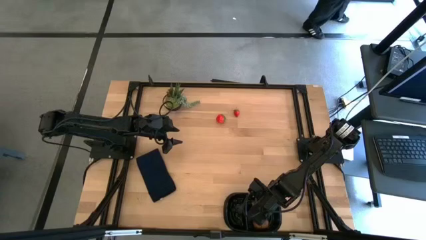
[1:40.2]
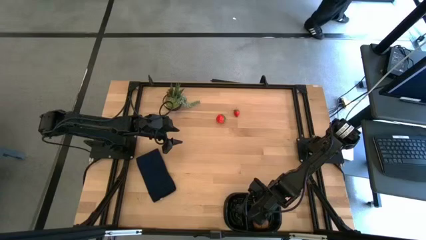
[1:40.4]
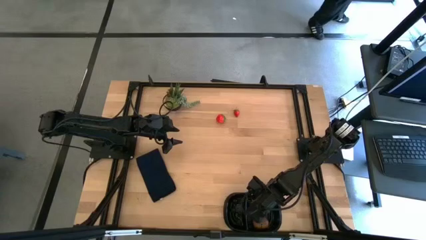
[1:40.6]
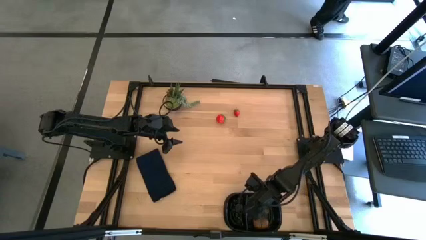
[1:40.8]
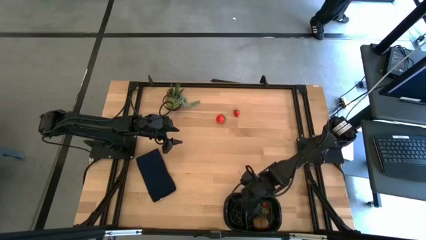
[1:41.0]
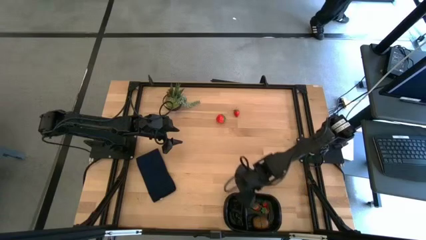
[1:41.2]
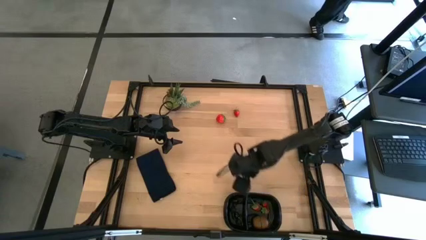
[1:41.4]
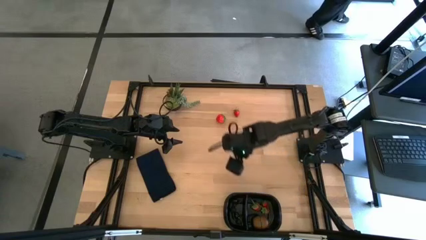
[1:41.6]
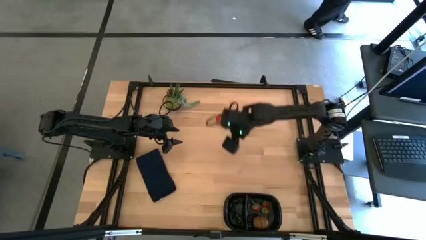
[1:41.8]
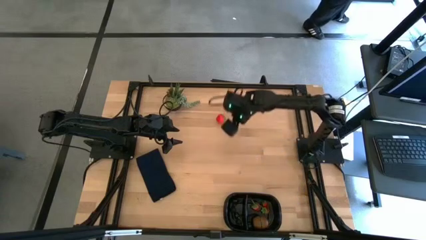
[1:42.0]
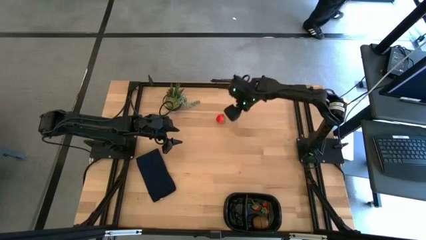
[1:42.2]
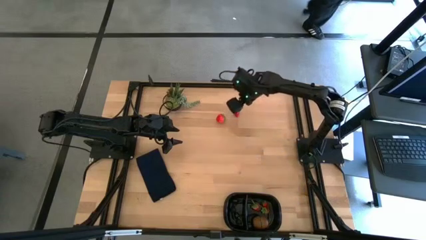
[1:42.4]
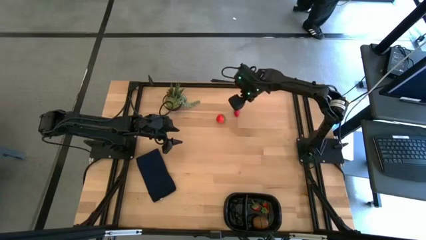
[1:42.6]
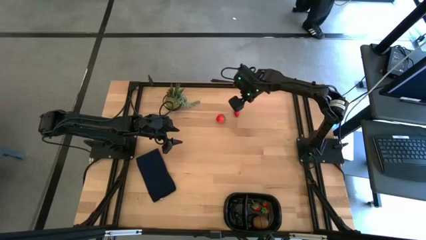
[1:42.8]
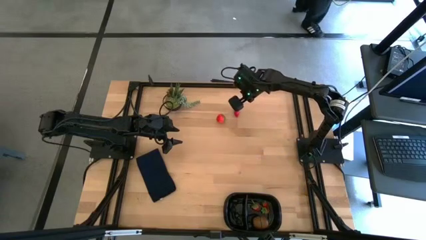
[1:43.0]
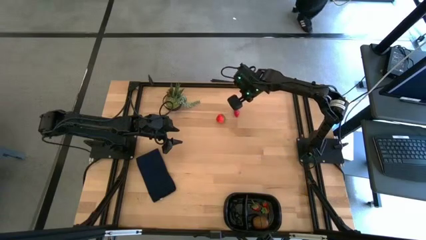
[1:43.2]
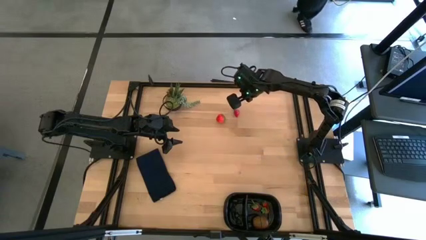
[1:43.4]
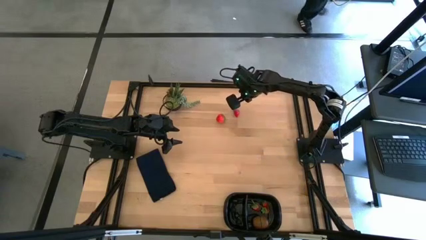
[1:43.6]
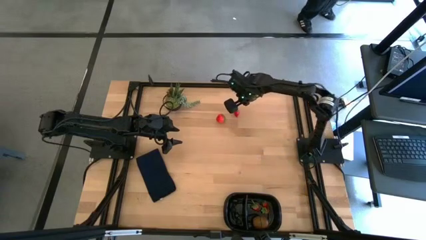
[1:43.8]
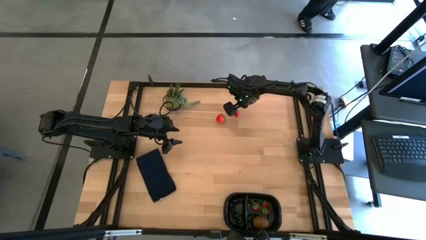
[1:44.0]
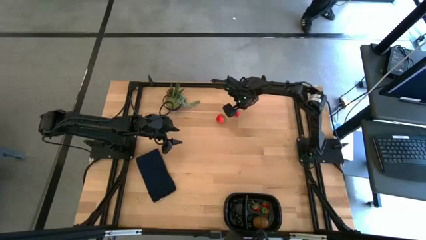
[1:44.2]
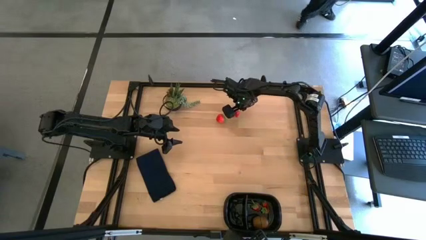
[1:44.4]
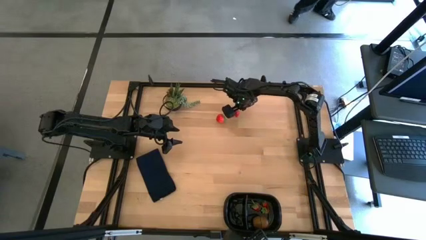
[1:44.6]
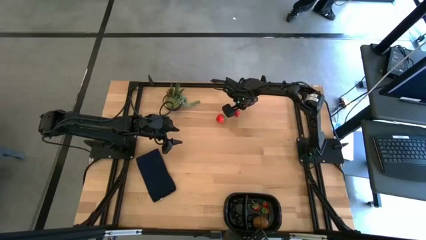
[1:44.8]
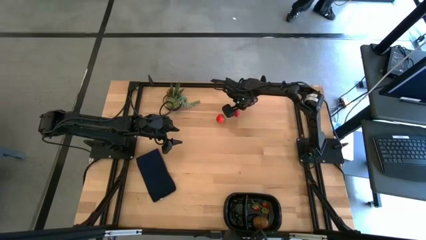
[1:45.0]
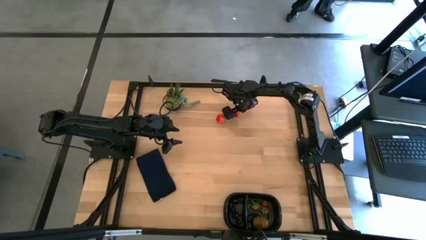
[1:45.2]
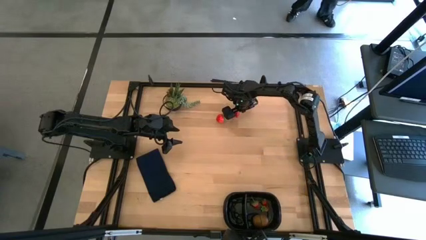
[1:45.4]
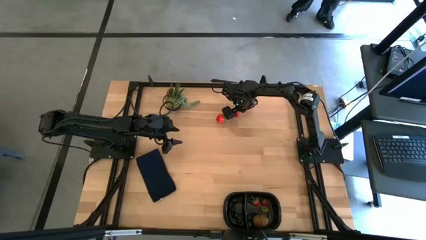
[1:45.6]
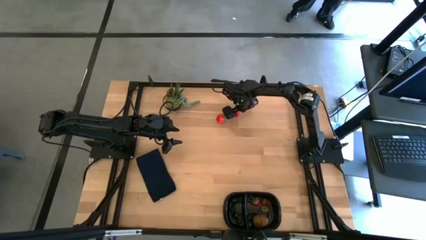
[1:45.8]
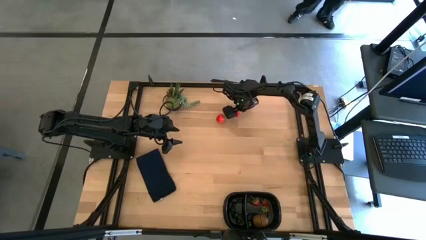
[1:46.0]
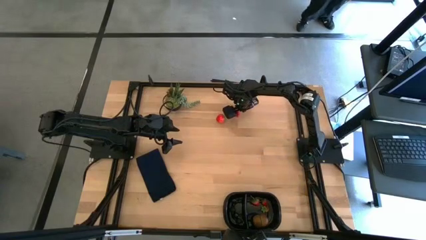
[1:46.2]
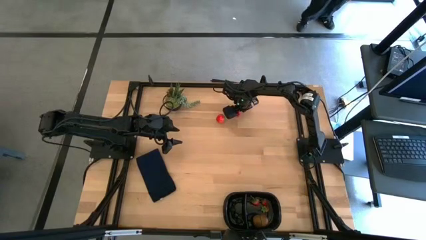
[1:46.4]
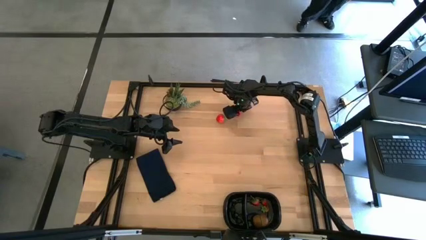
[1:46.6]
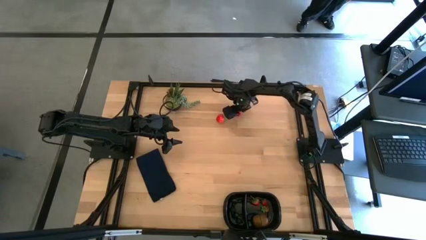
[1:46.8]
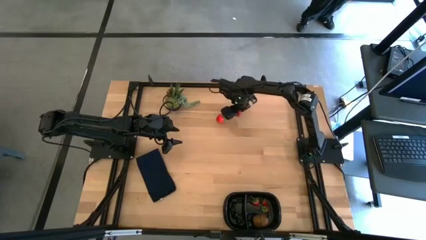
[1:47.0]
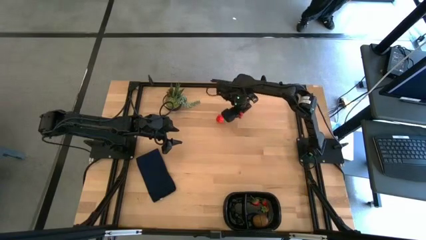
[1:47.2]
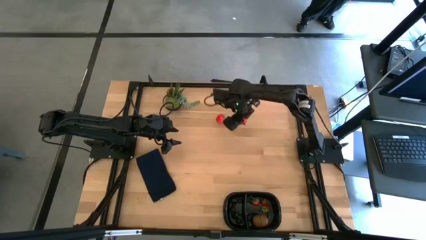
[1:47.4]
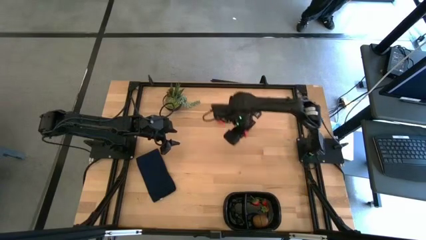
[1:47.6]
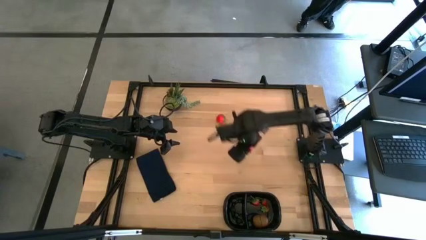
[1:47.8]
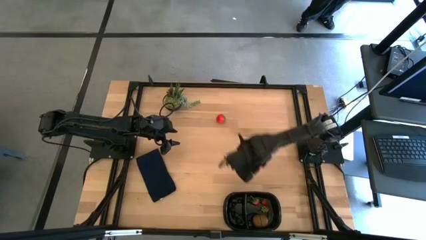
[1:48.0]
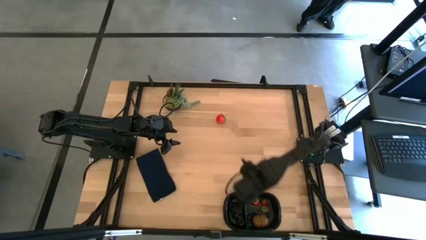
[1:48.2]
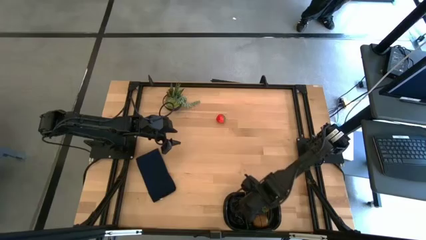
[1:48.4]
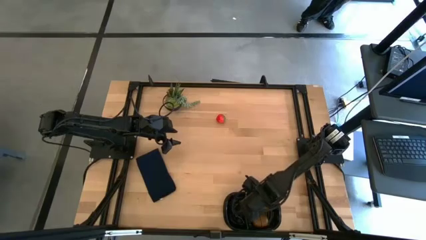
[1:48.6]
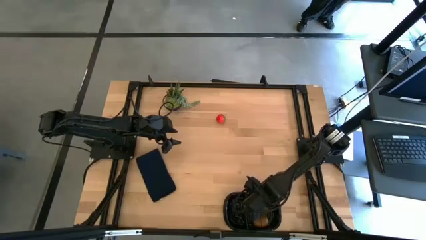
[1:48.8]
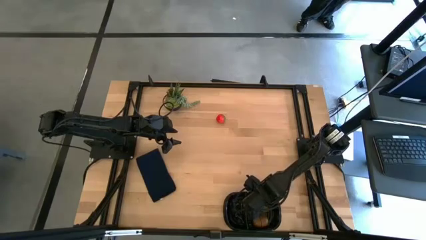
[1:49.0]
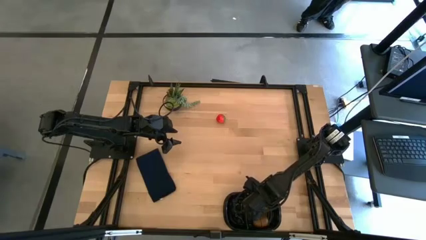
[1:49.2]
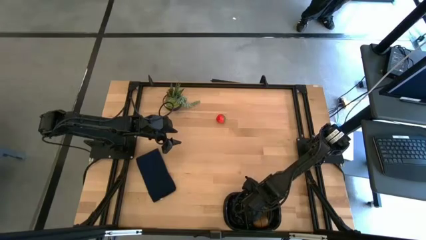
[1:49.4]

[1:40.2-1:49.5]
Task: Pick and placing Produce into tupperware
Put the small red strawberry into the black container

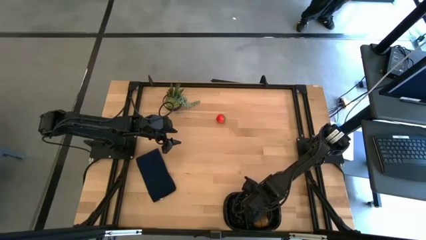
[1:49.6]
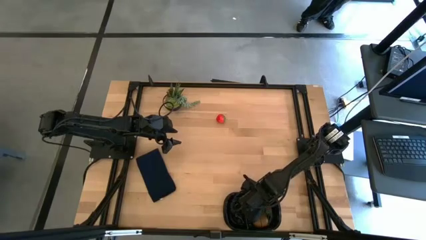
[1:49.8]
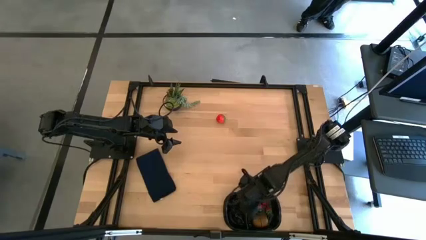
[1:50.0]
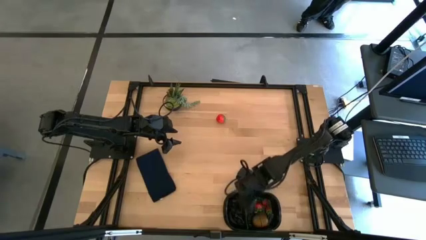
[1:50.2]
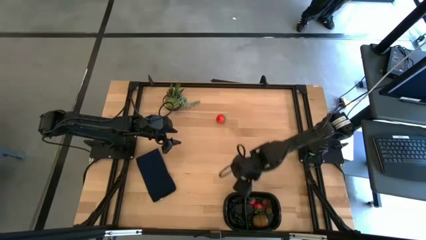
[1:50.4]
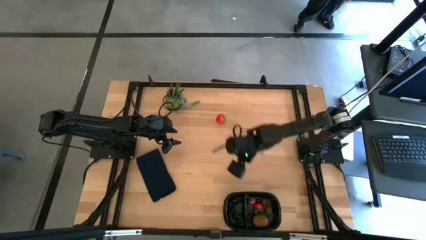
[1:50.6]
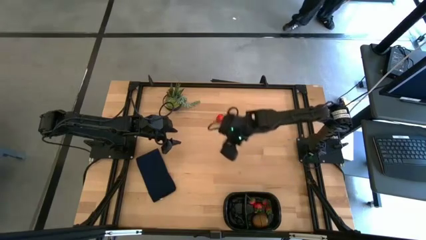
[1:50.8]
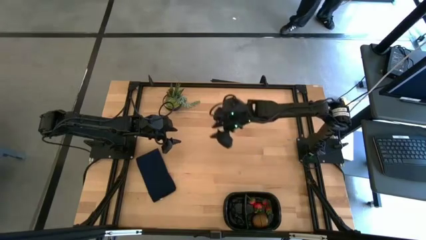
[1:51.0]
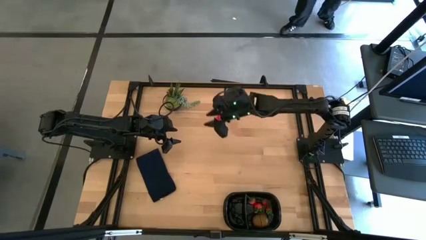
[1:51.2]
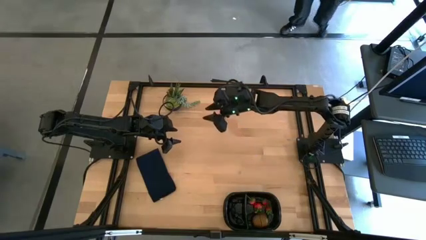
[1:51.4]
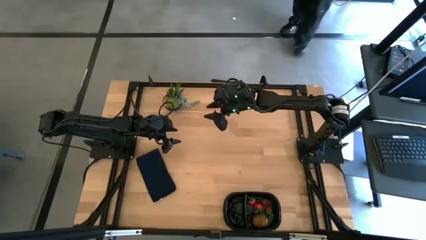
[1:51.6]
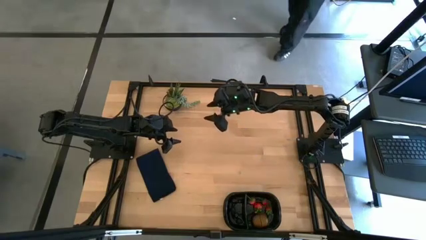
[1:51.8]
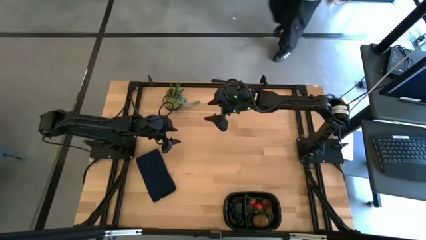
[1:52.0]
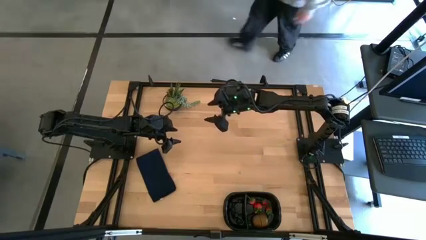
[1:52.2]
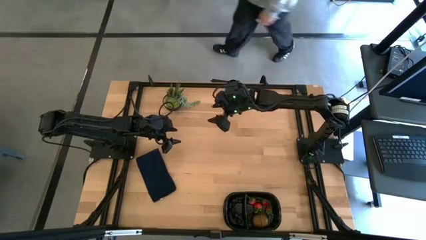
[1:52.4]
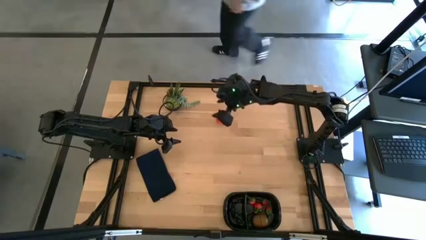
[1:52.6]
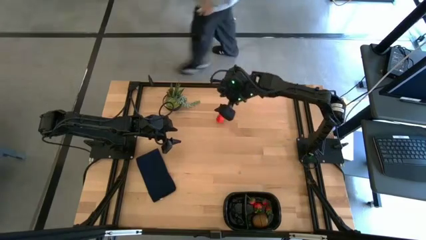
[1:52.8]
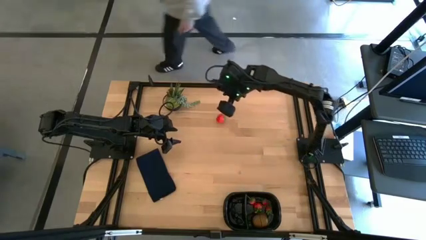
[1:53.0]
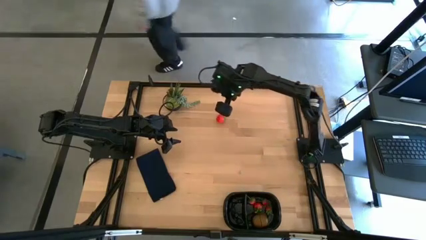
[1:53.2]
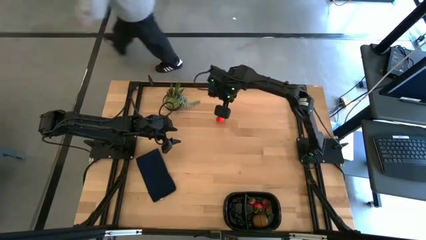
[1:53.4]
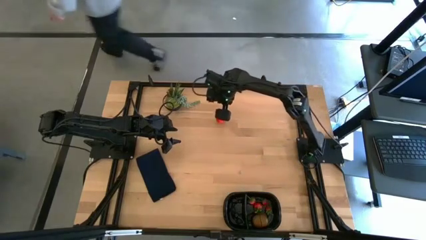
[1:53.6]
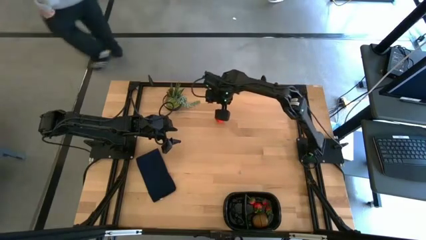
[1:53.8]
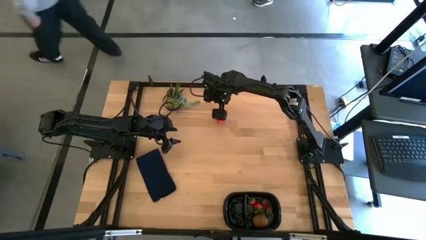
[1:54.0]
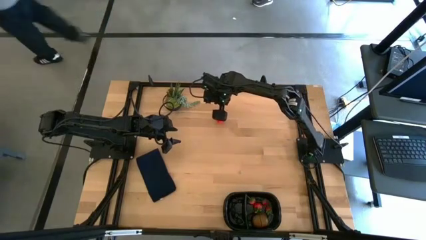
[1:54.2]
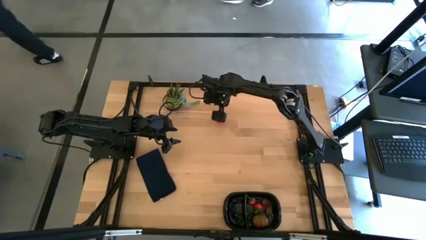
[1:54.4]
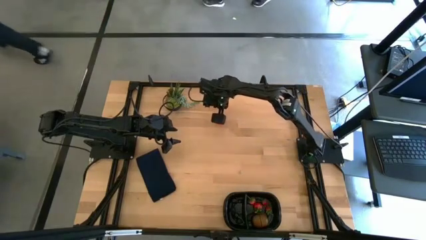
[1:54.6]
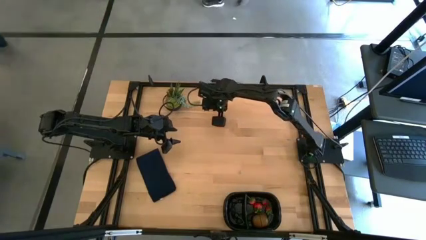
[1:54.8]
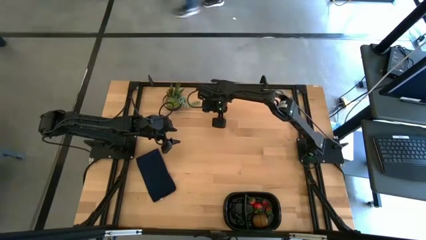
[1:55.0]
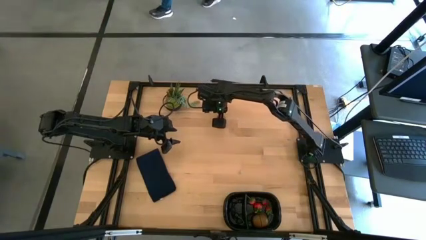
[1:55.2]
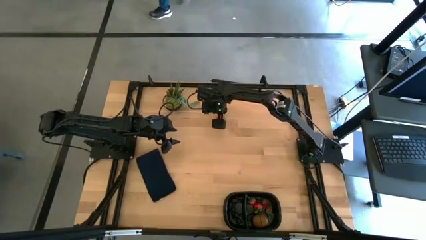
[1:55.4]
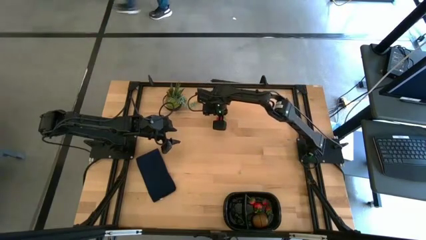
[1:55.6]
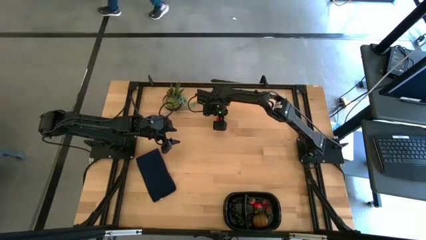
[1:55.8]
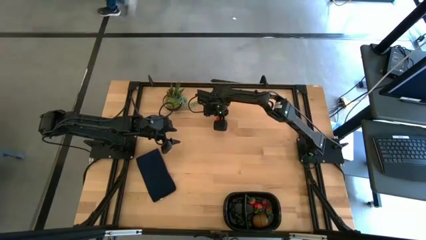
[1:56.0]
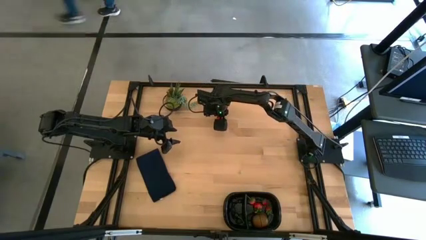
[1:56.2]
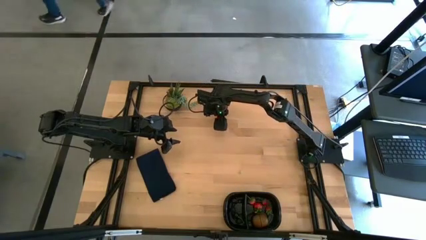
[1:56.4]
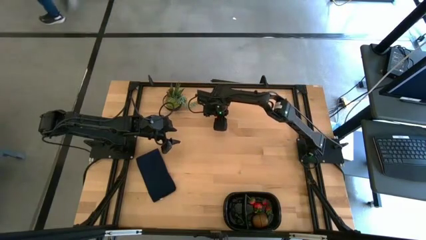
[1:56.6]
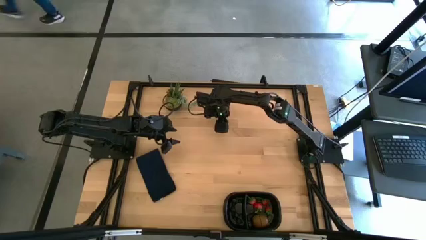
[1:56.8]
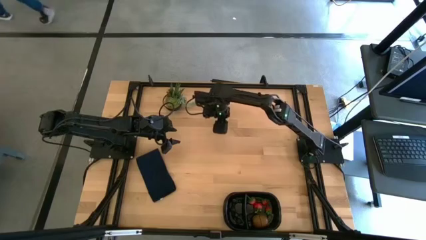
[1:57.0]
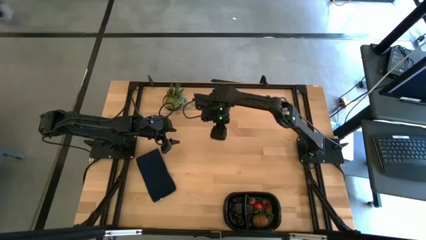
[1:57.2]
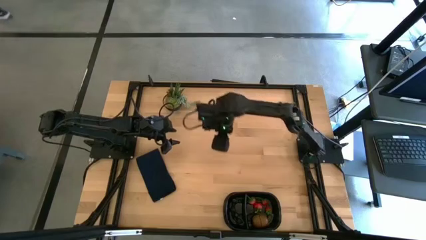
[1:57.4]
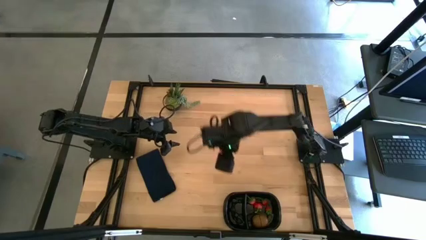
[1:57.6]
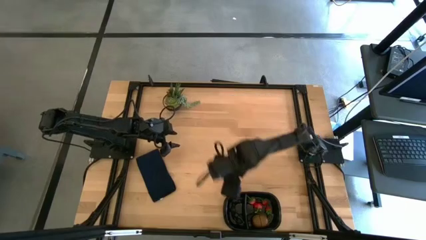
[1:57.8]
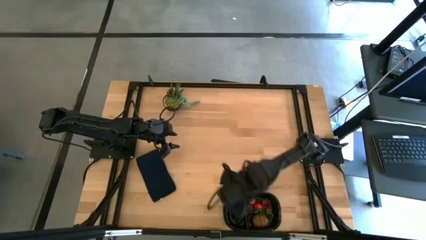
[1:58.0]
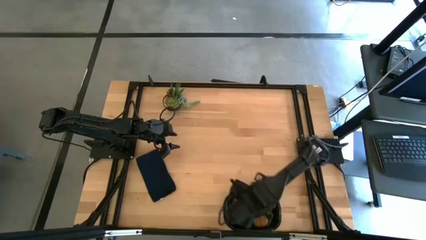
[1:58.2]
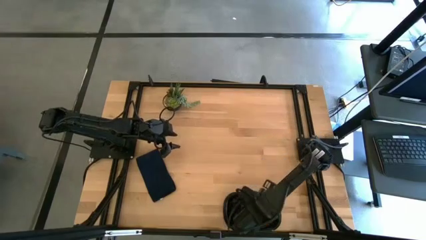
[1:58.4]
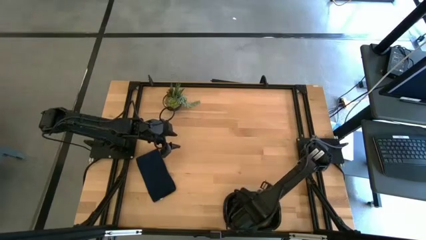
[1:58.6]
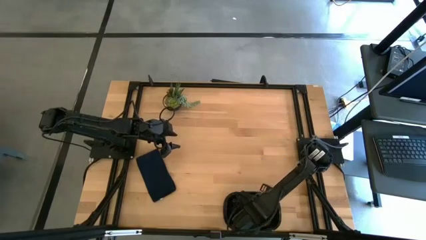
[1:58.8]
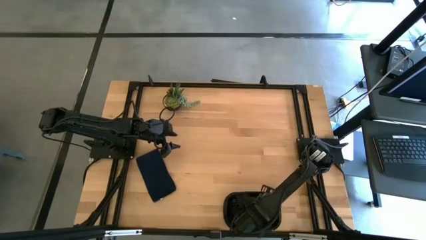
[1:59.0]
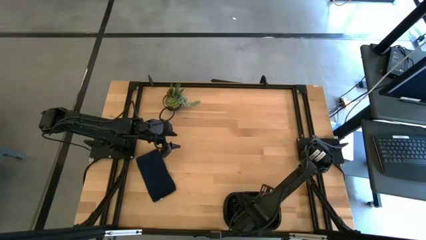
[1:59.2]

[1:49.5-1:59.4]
Put the big red strawberry into the black container
